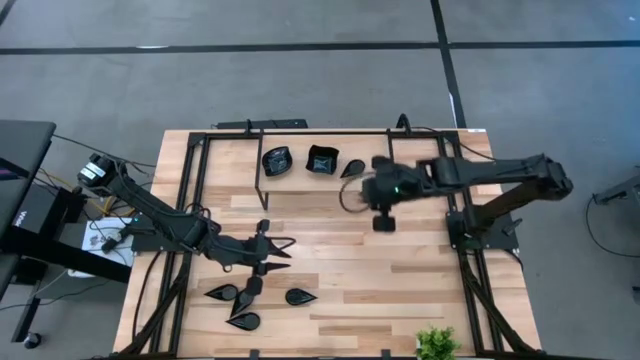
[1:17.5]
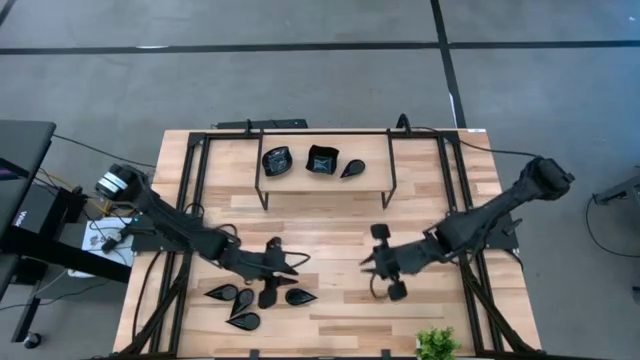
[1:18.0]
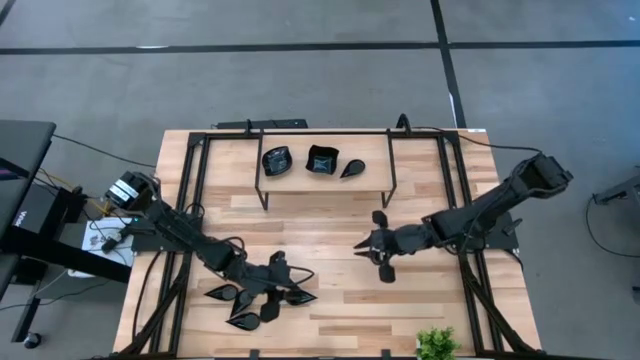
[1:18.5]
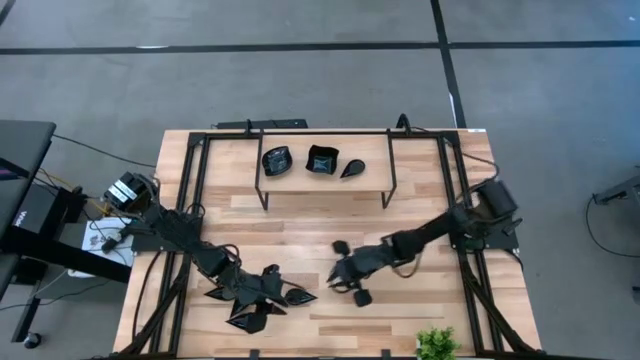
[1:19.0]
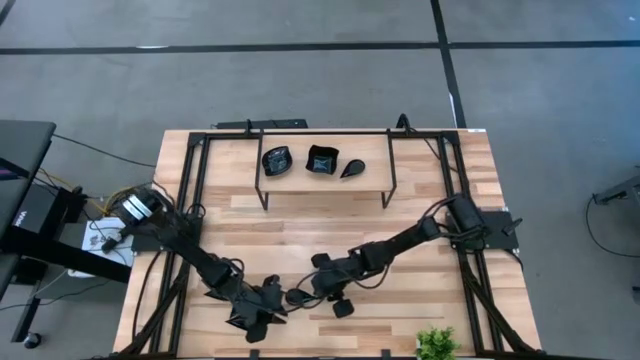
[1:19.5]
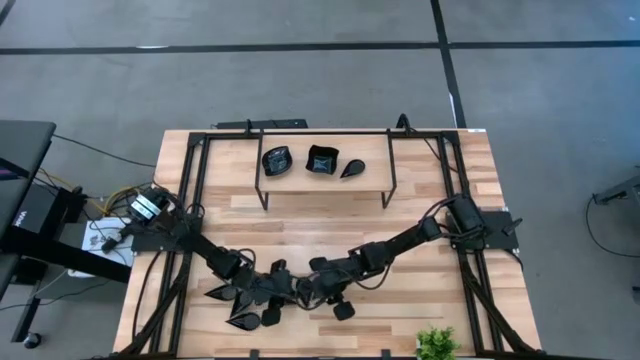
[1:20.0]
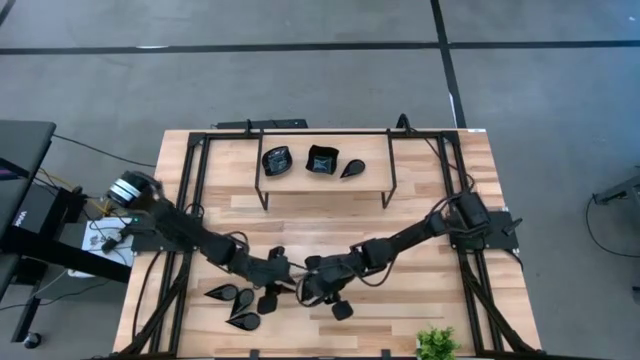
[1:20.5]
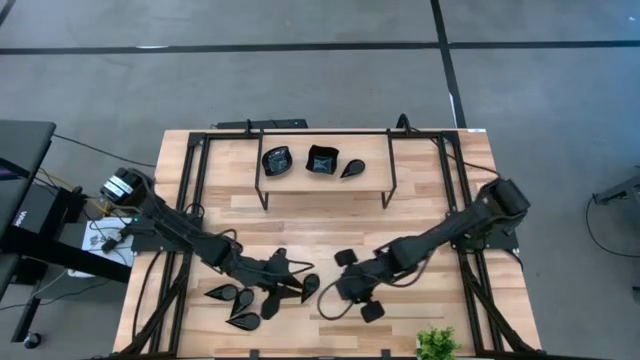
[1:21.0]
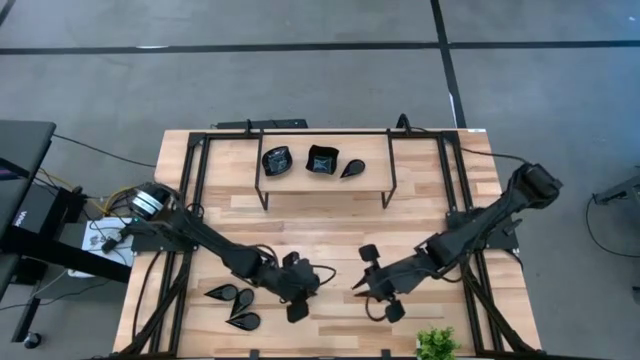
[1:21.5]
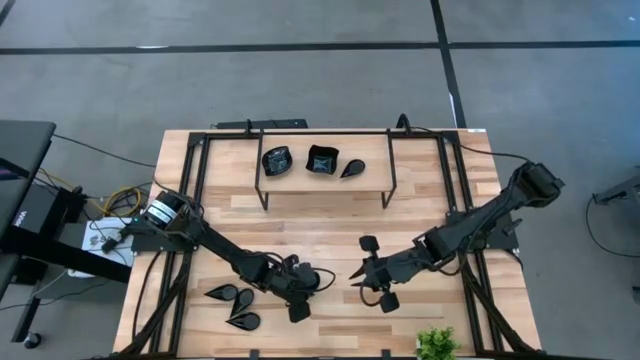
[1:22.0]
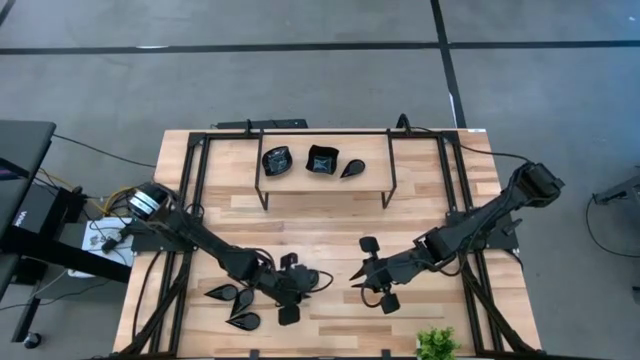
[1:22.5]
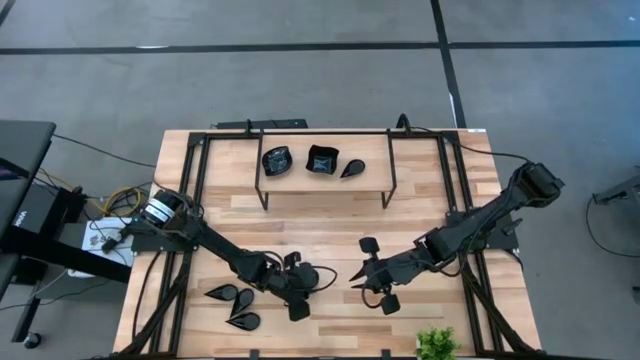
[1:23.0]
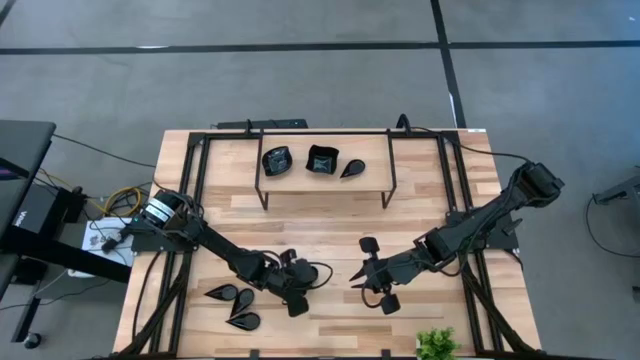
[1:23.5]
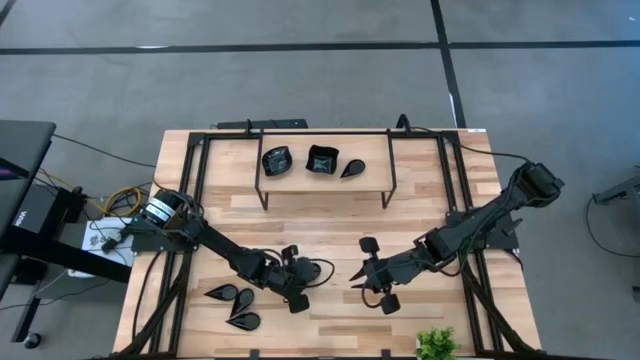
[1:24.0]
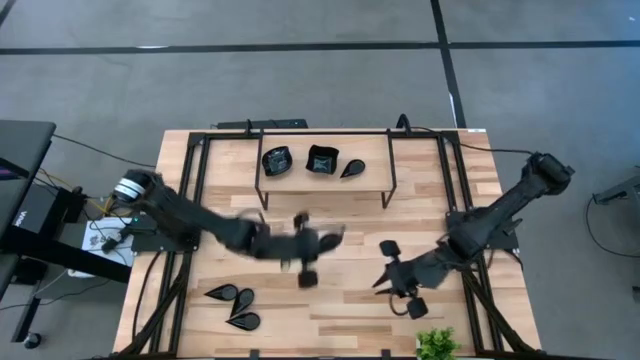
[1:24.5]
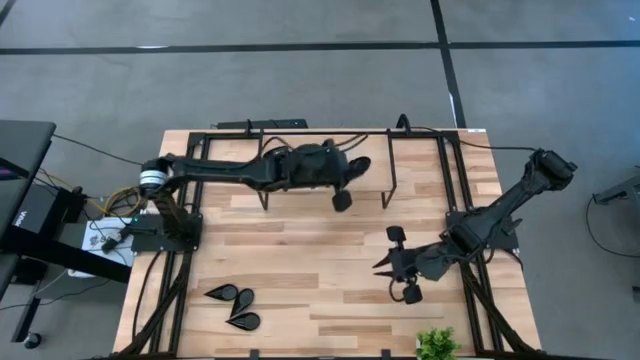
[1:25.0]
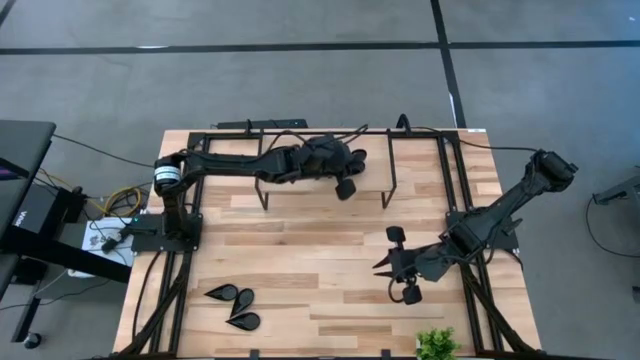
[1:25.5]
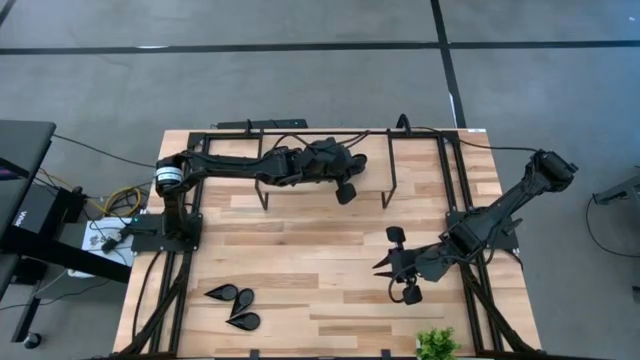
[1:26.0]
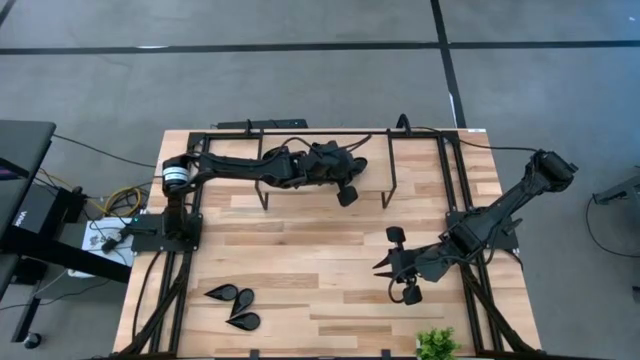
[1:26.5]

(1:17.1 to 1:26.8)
Task: Pick & Place Mini shaped plates
Stack the black drop-shaped plate on top of the black drop-shaped plate on the shelf

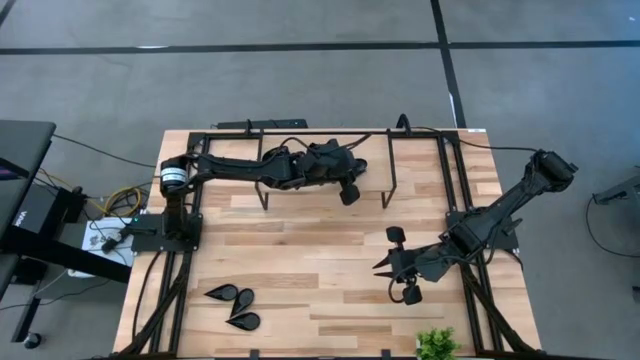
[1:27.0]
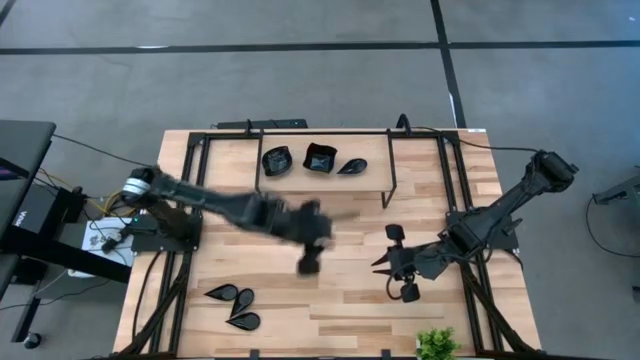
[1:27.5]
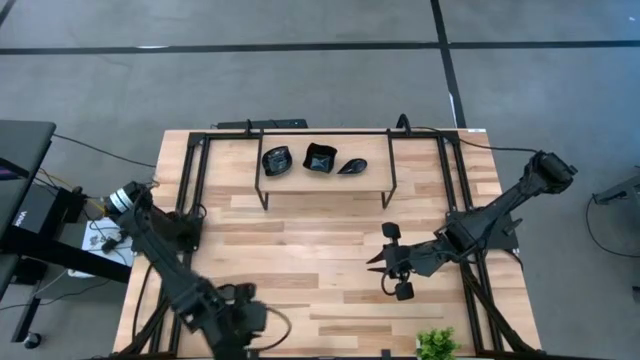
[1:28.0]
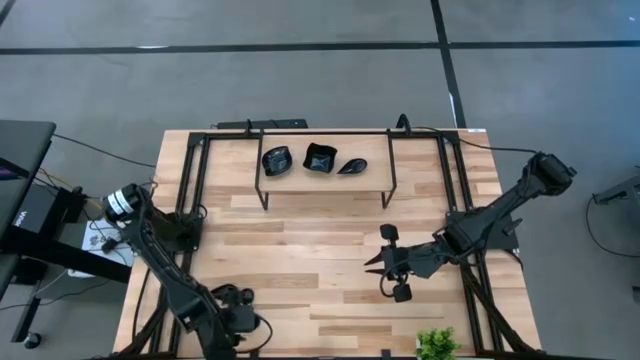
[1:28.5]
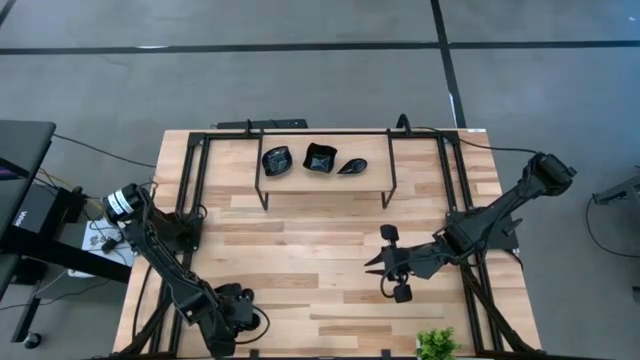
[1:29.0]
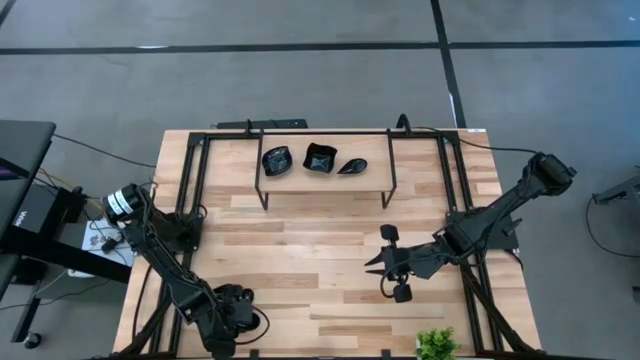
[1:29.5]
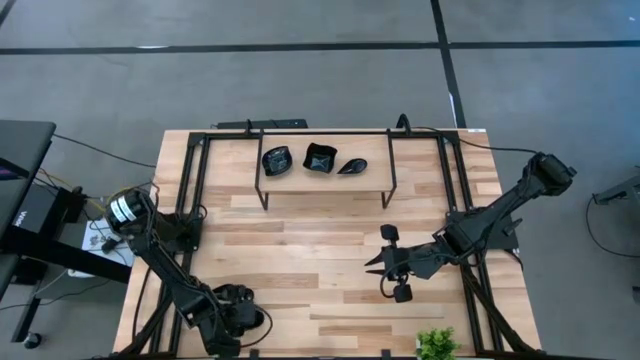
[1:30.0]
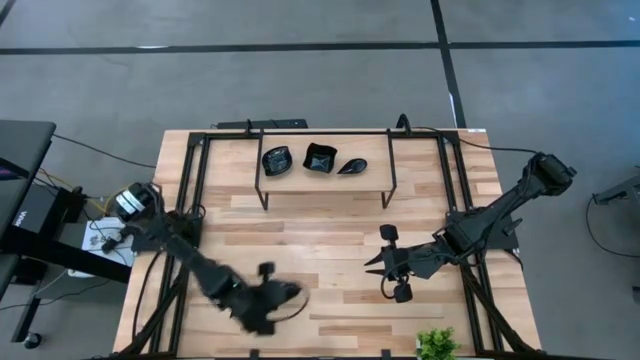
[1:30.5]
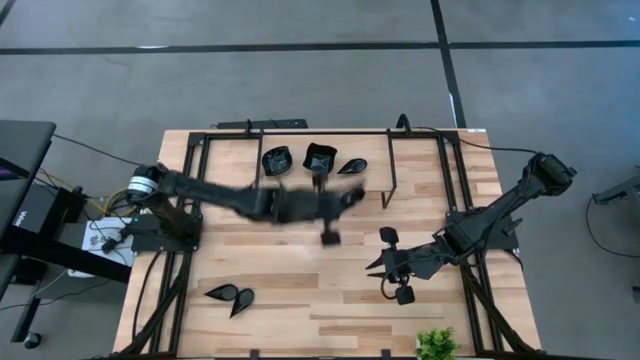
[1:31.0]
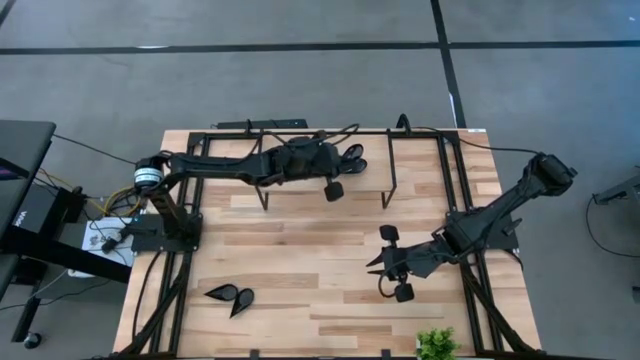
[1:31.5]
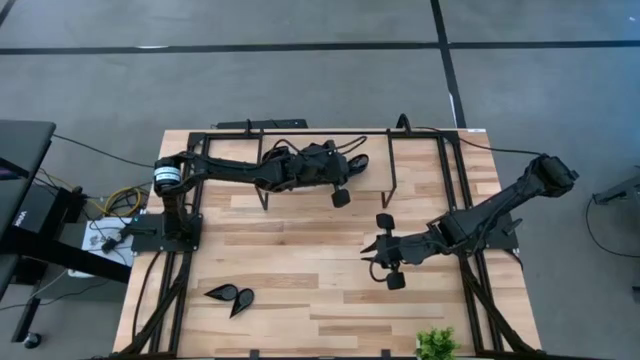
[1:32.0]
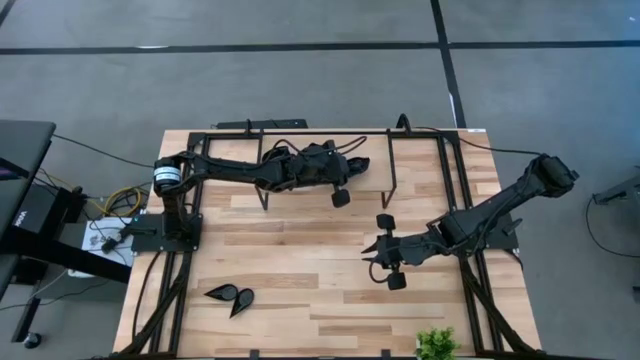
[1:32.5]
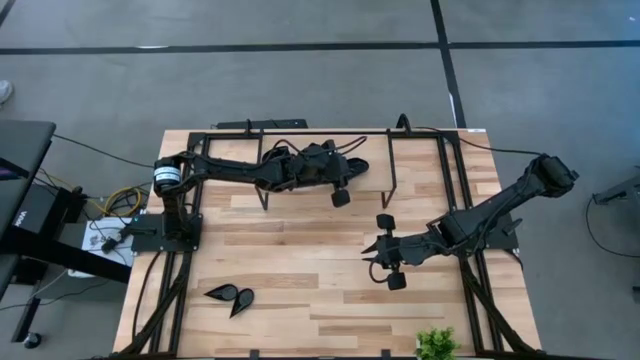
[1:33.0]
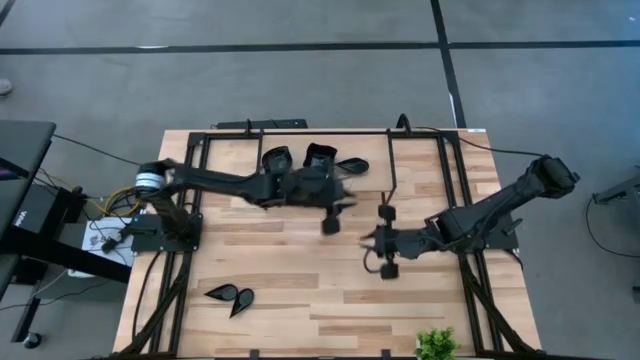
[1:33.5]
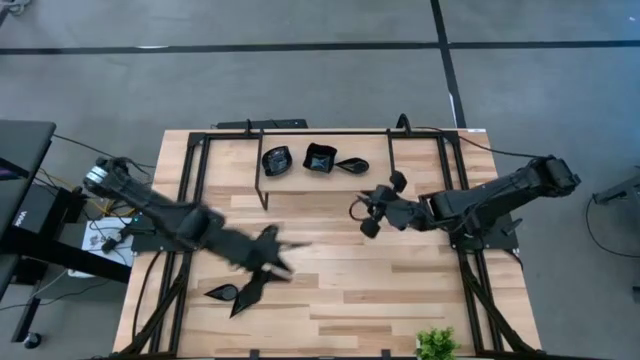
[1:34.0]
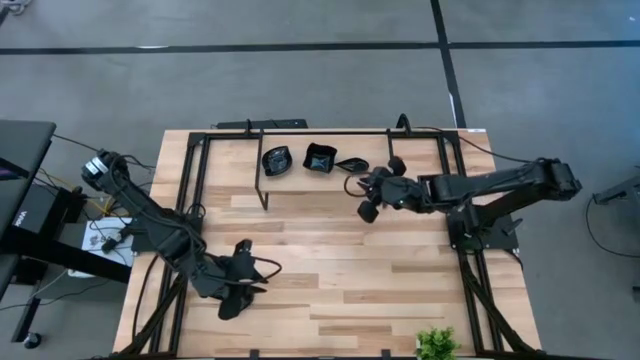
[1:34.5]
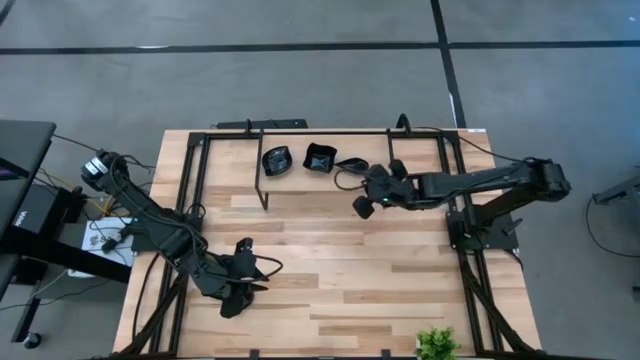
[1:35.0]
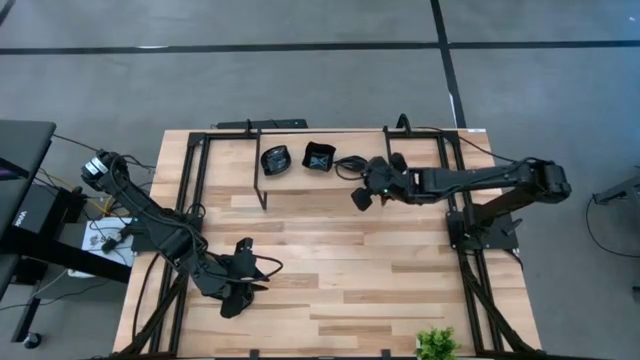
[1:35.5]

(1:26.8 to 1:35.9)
Stack the black drop-shaped plate on top of the black drop-shaped plate on the shelf

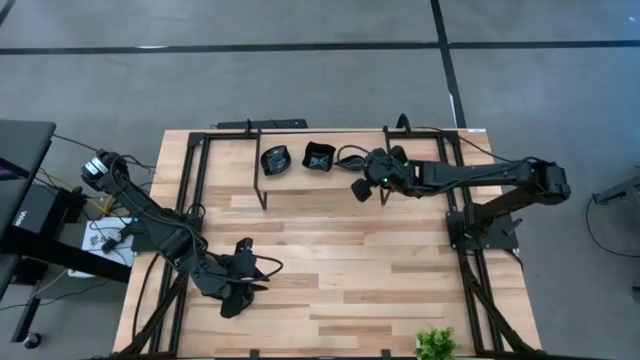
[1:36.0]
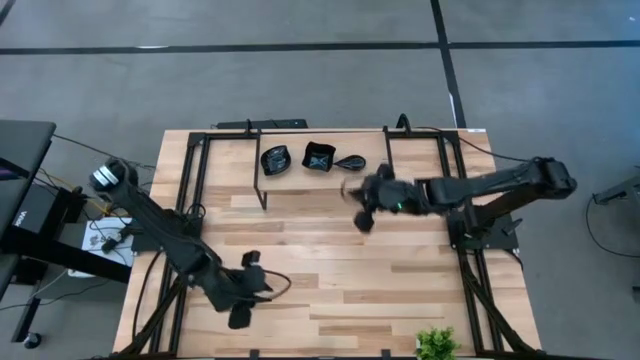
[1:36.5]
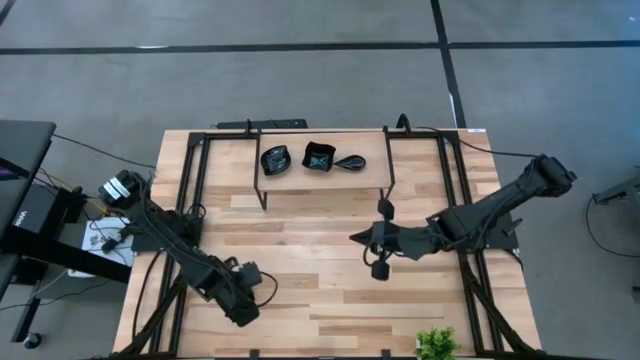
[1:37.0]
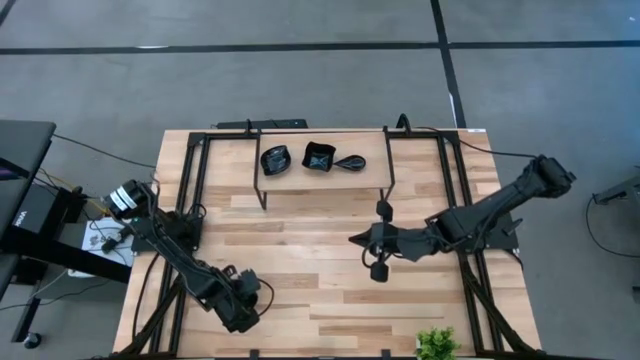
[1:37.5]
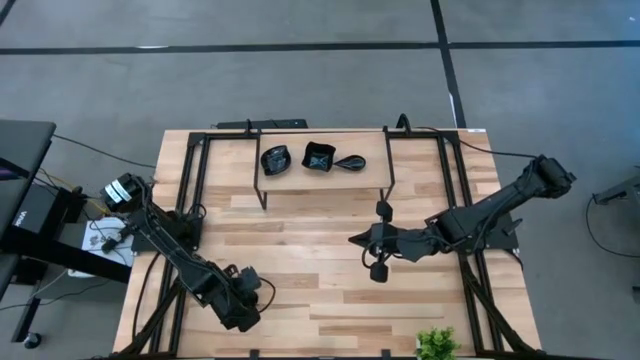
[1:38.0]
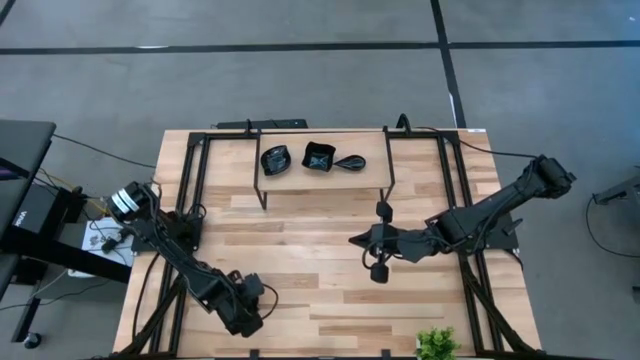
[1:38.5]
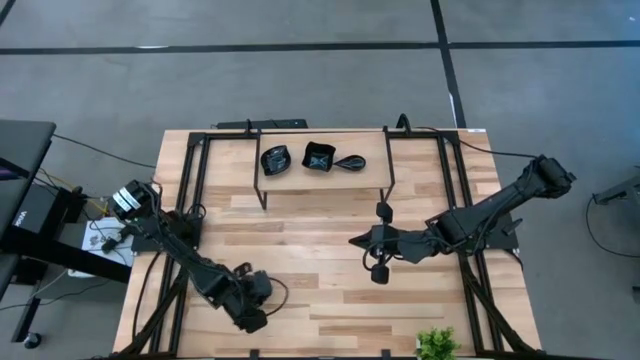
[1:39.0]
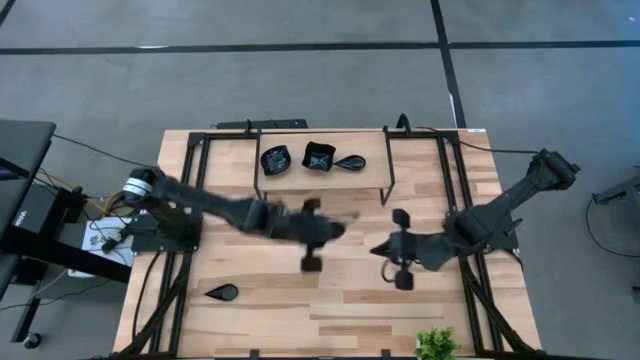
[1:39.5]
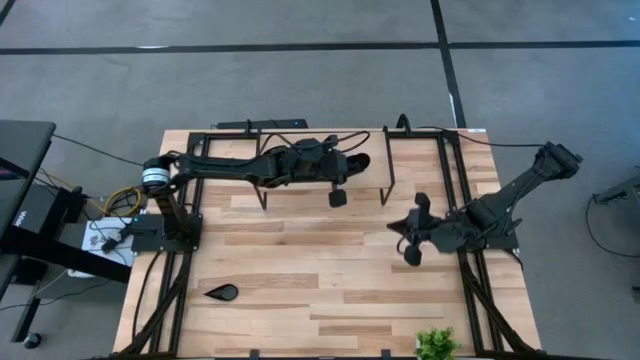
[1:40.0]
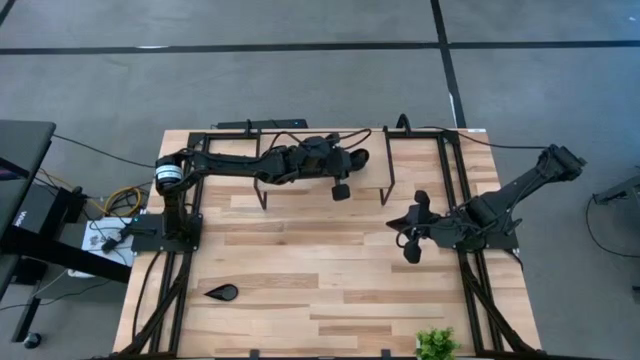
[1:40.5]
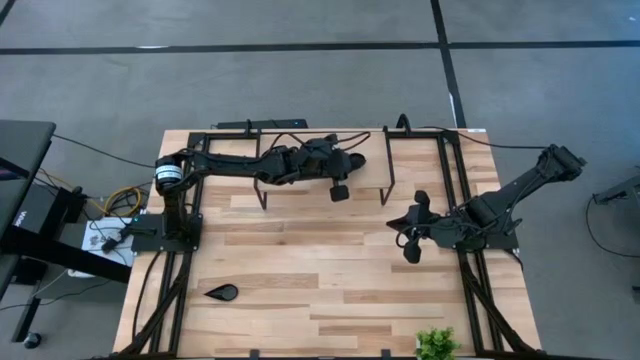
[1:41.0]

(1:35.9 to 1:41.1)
Stack the black drop-shaped plate on top of the black drop-shaped plate on the shelf
